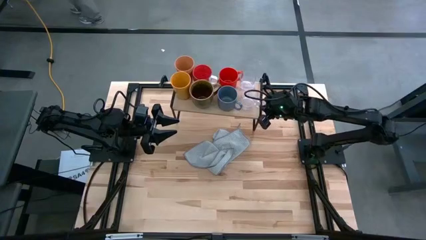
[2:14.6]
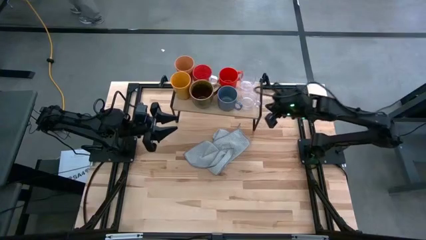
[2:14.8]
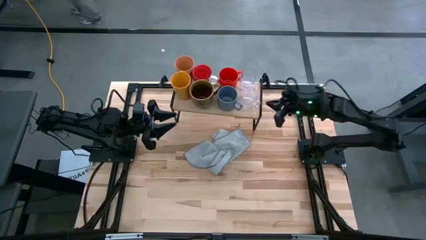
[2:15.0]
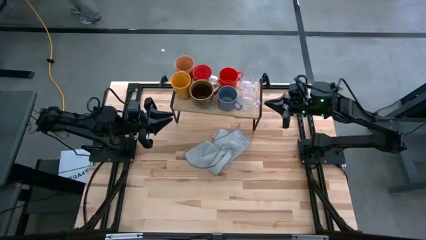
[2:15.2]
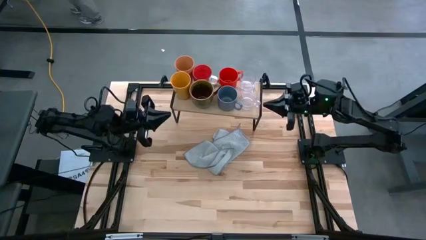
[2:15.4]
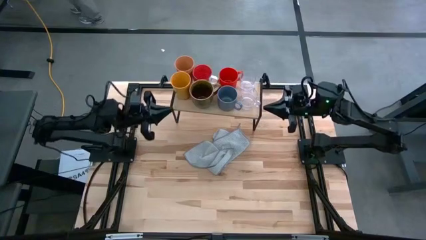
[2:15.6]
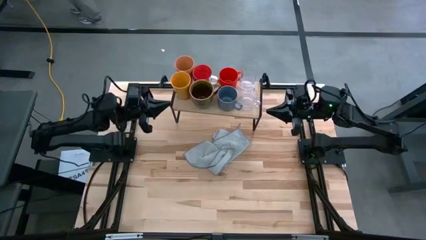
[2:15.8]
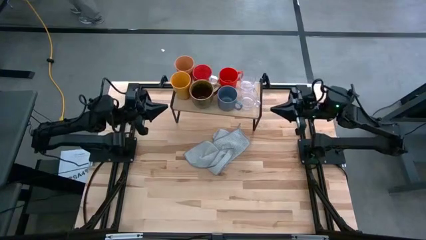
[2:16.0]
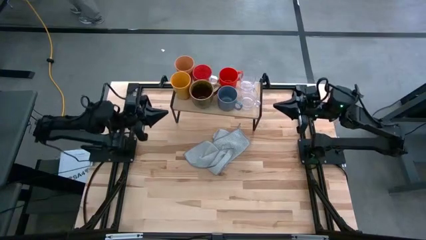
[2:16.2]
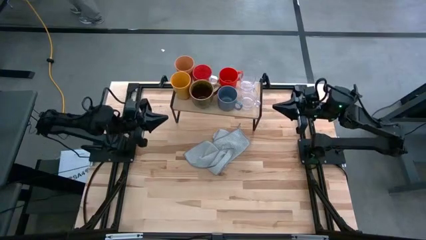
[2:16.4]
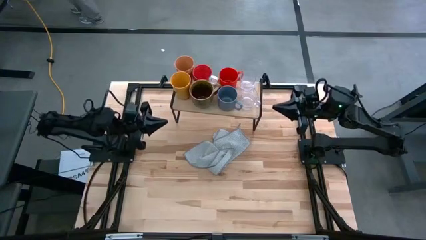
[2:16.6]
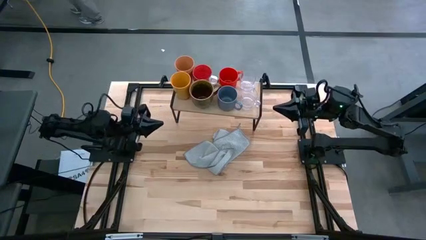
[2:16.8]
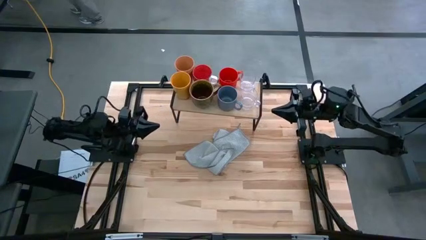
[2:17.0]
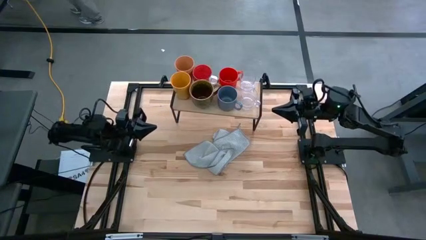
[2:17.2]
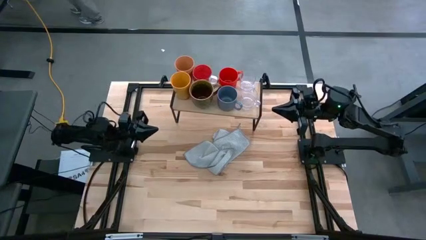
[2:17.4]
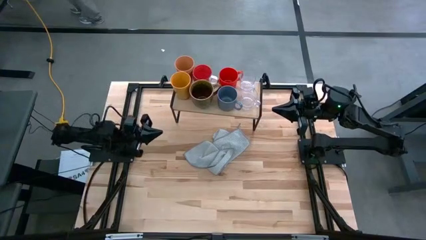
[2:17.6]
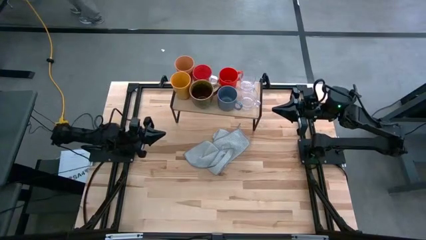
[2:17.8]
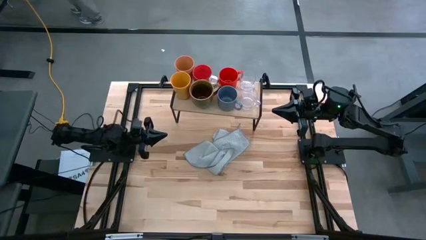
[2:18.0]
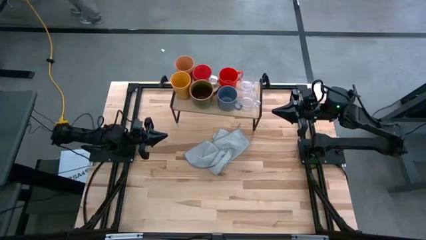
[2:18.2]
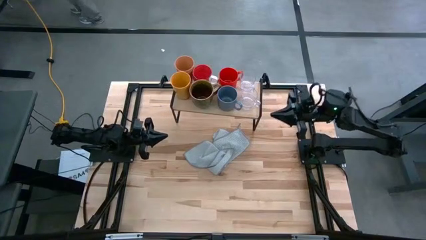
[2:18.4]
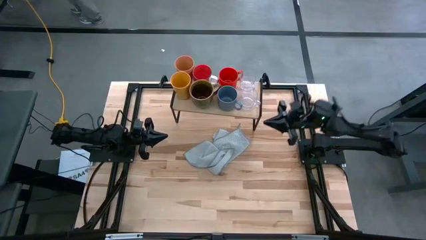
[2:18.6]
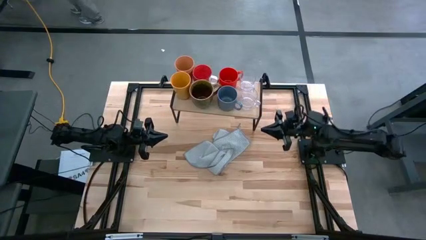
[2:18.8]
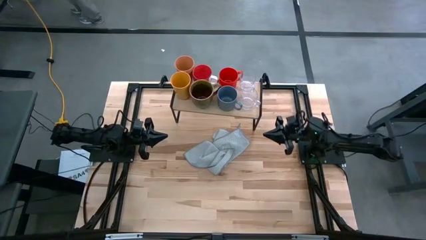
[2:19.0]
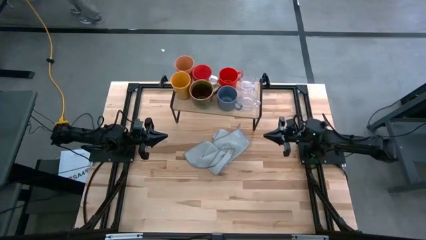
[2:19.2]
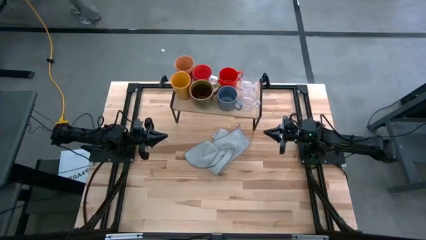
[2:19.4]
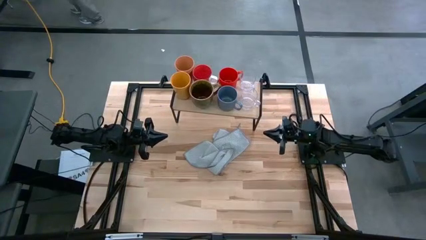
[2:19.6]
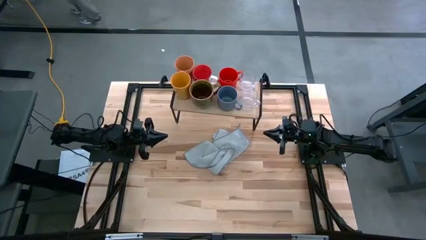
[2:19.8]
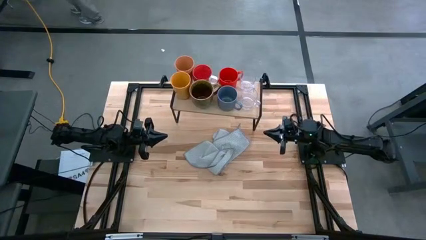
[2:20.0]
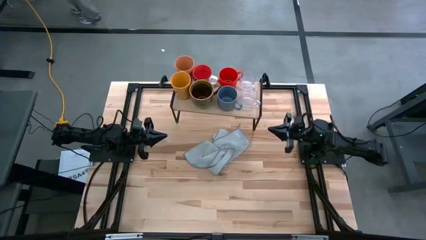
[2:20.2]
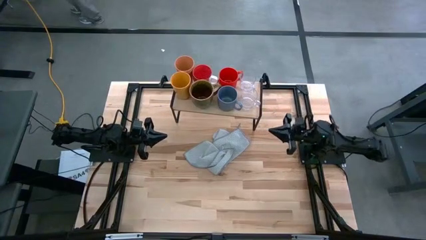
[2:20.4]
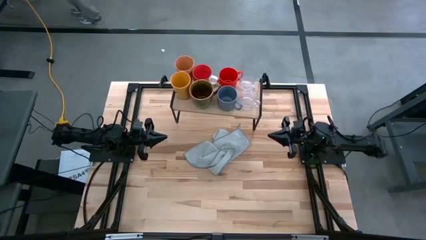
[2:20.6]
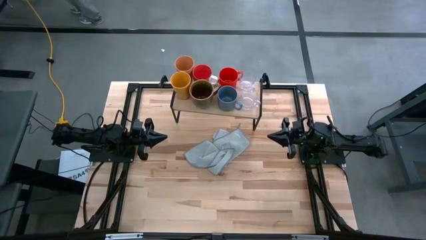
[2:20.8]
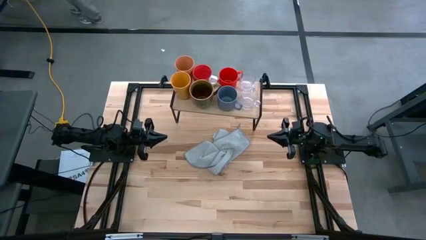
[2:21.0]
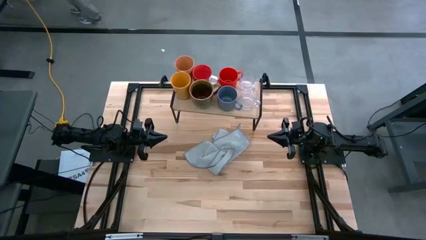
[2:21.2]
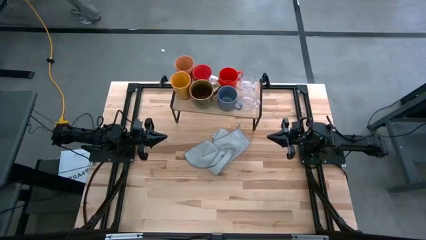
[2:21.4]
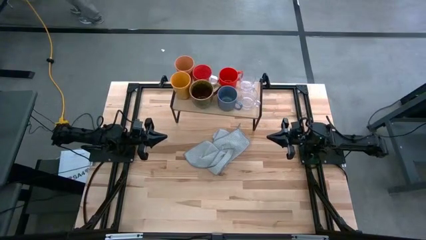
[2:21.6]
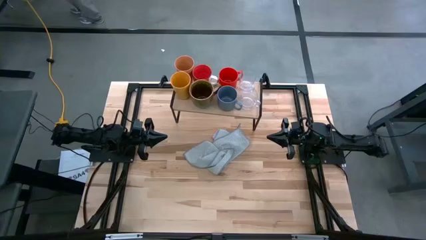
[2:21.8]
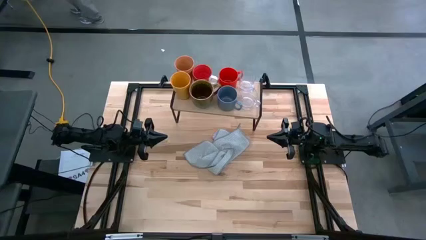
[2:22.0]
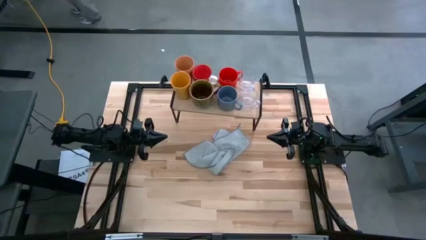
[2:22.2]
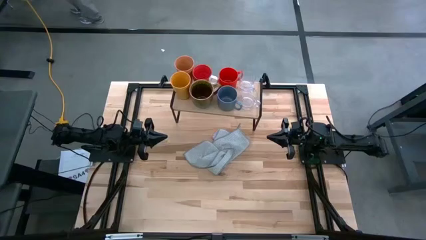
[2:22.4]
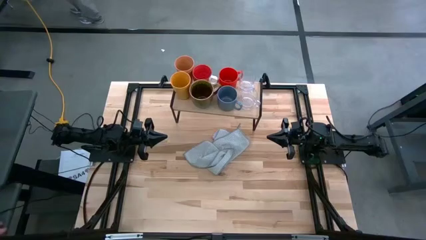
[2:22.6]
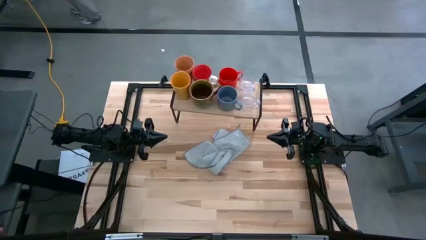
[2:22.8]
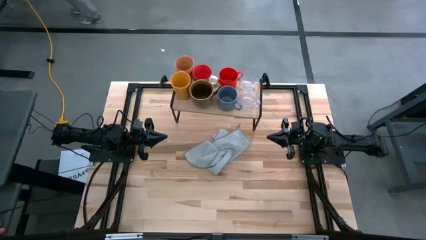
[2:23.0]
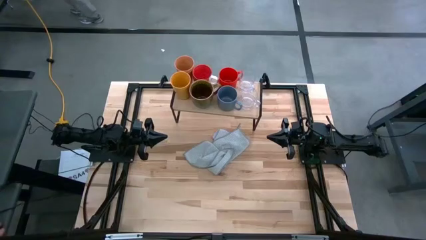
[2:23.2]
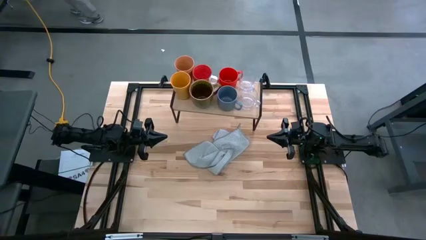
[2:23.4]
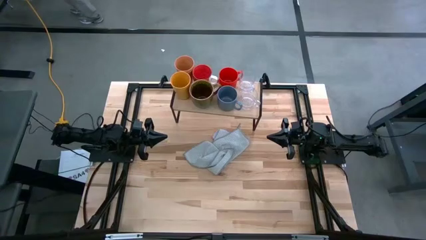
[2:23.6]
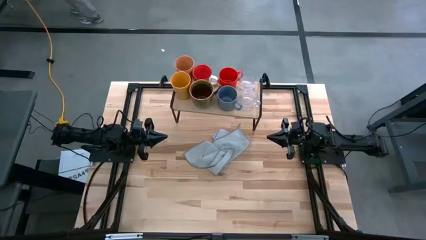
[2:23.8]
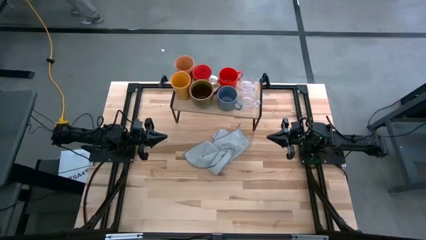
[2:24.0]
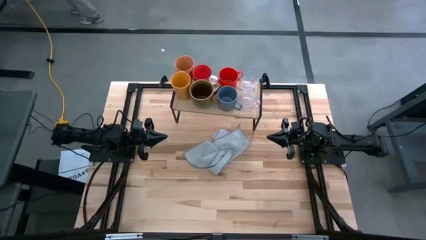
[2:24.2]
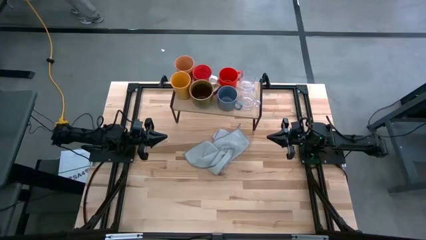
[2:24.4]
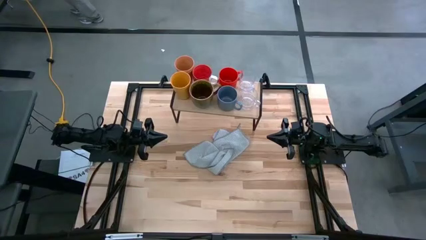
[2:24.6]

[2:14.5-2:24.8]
Task: Stack small to large cups/mugs on shelf
Return to home position

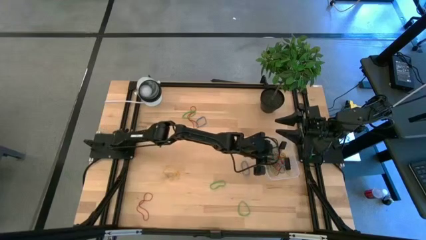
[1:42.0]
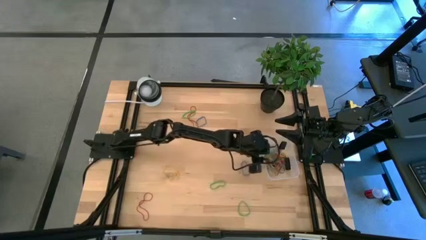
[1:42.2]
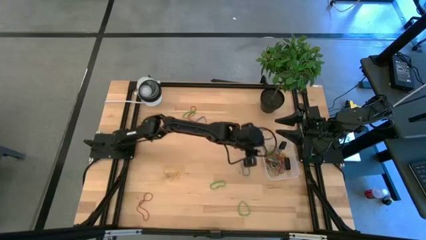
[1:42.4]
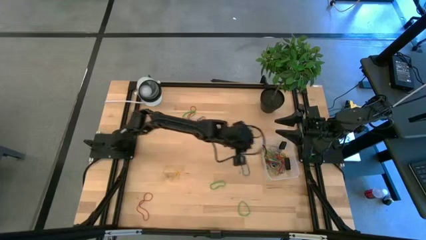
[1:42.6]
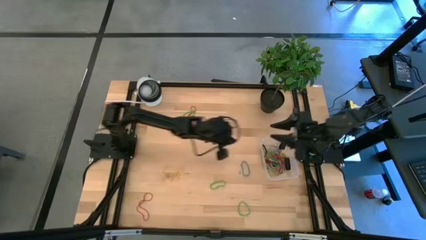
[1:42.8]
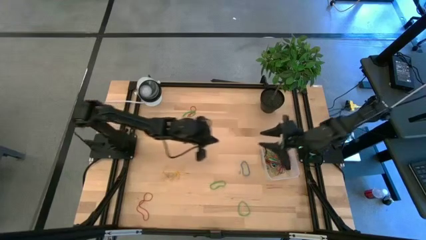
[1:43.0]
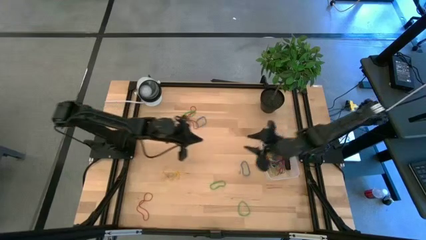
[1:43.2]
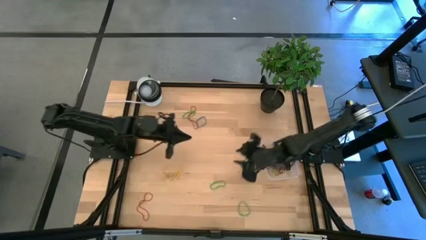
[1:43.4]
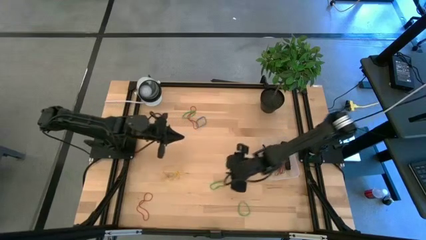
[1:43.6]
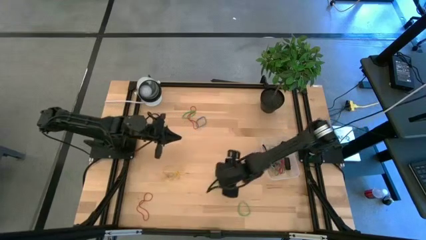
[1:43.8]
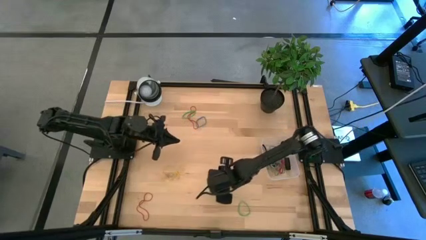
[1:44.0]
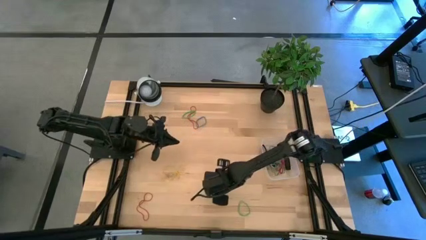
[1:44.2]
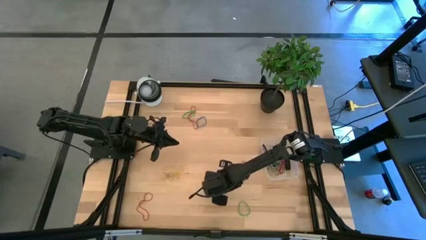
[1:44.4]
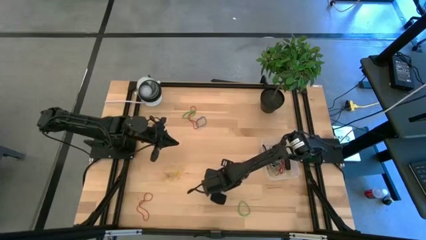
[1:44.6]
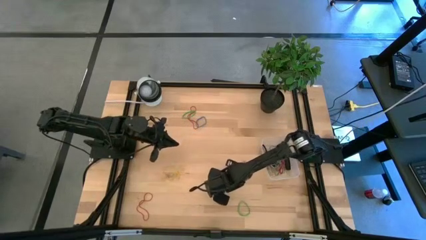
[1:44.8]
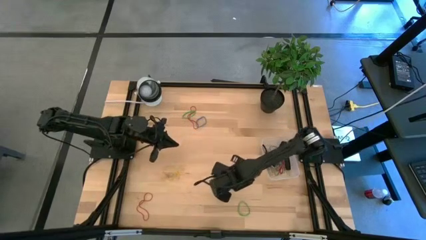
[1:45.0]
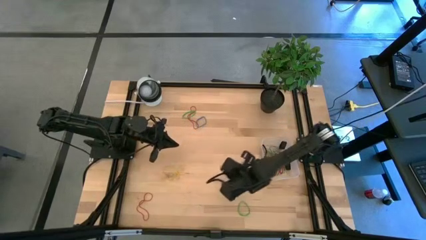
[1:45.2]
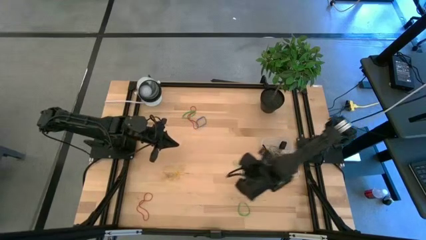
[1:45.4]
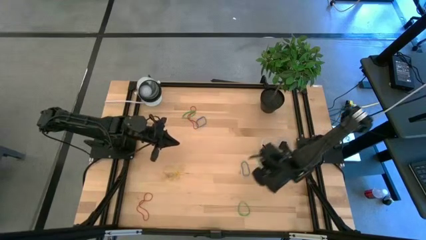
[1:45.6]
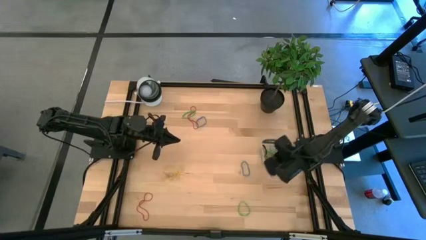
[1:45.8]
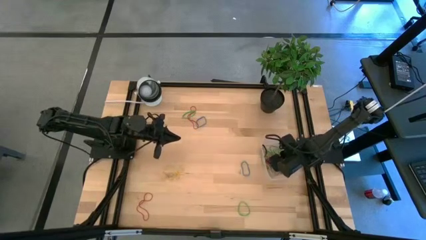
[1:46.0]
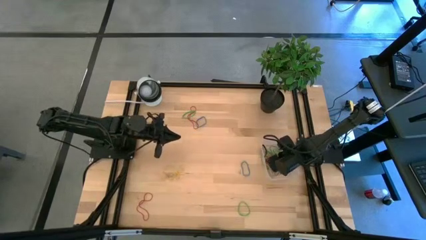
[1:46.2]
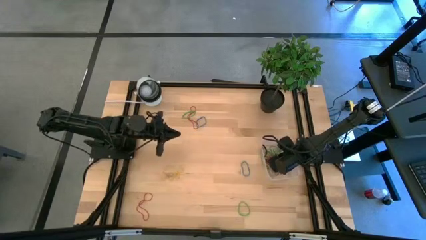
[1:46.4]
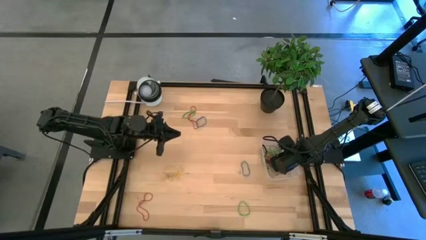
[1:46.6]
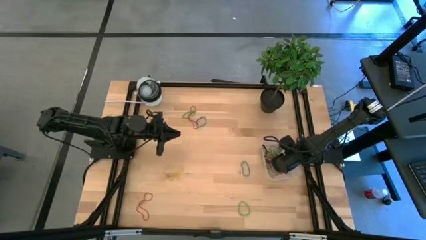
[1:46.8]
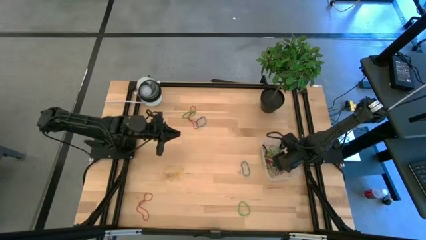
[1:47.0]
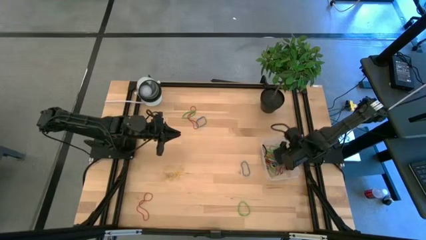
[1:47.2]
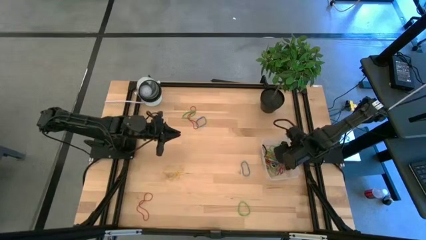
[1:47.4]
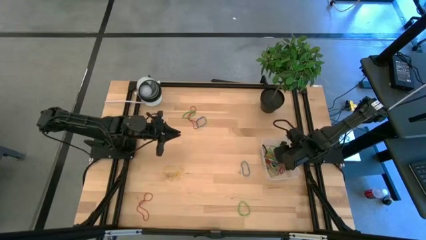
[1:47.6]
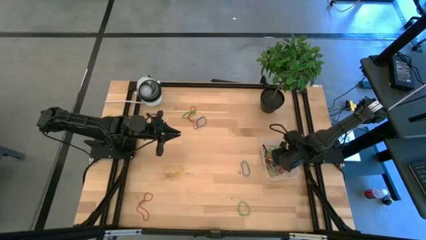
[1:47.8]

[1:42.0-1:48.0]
Task: Pick and place rubber bands into bin
Put the green rubber band into the transparent bin

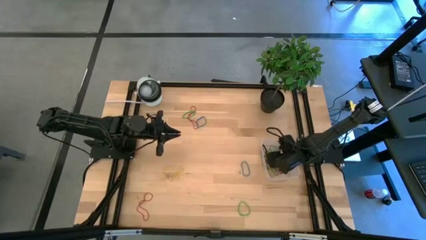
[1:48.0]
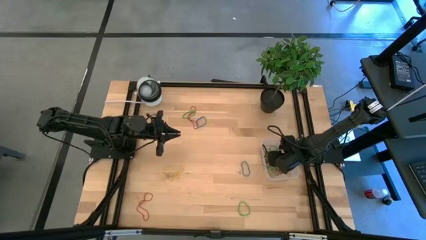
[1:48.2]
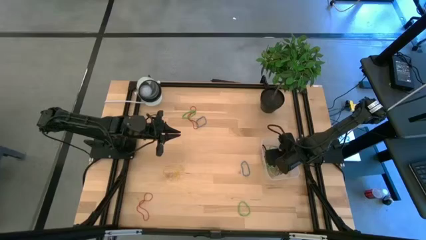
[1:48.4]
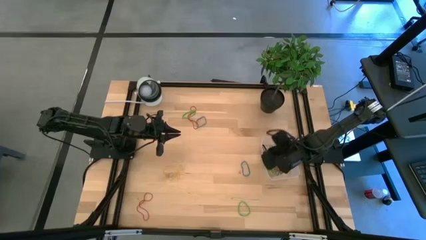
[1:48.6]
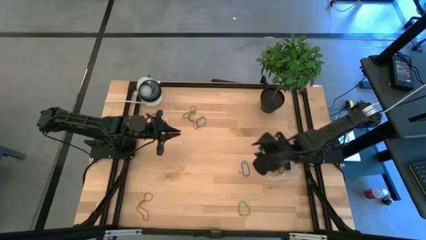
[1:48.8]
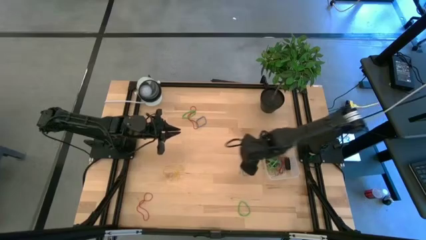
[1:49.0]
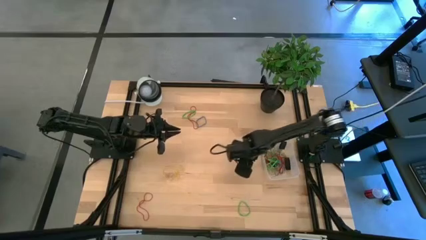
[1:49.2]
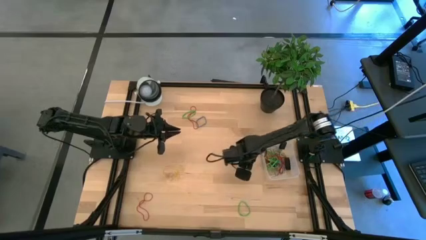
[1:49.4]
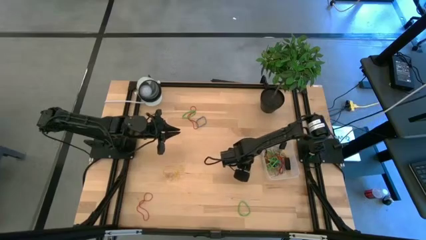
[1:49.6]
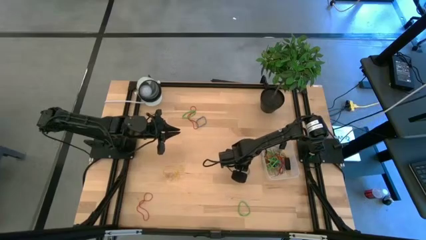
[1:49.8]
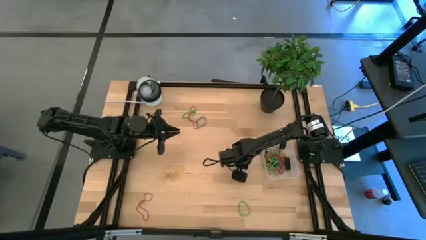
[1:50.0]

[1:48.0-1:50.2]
Put the blue rubber band into the transparent bin
